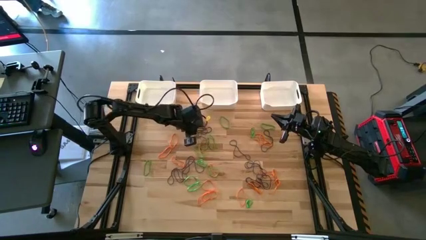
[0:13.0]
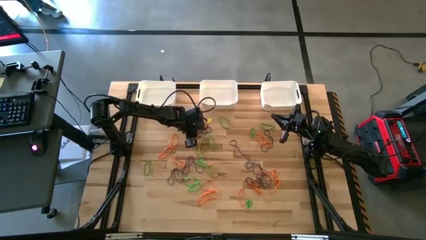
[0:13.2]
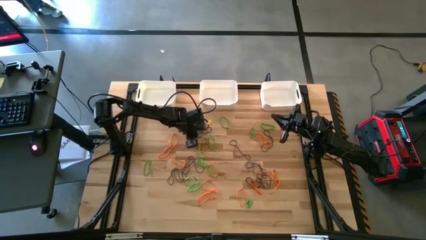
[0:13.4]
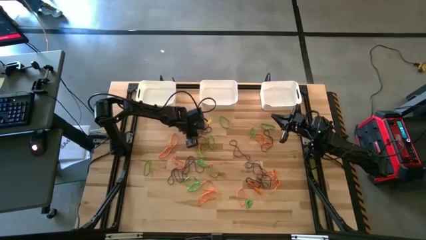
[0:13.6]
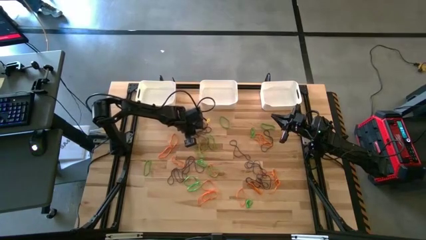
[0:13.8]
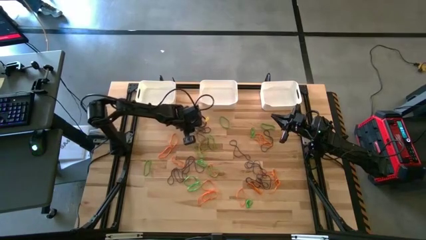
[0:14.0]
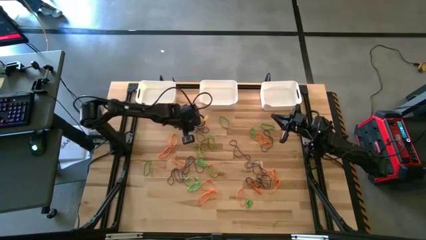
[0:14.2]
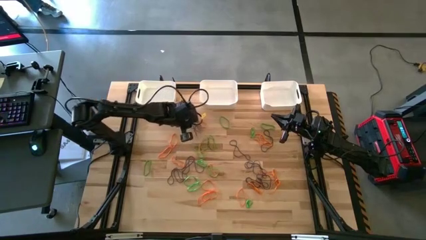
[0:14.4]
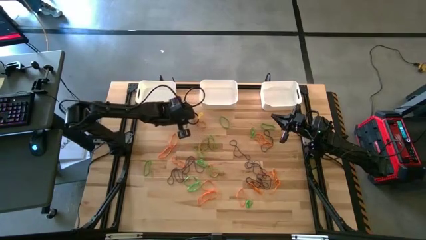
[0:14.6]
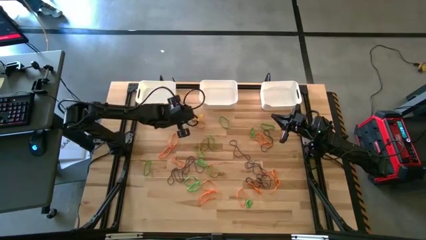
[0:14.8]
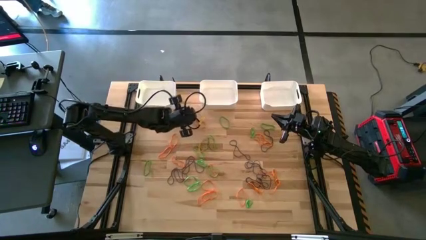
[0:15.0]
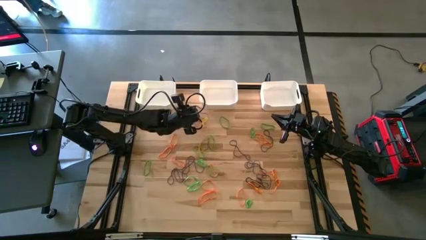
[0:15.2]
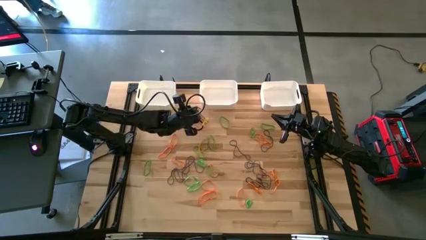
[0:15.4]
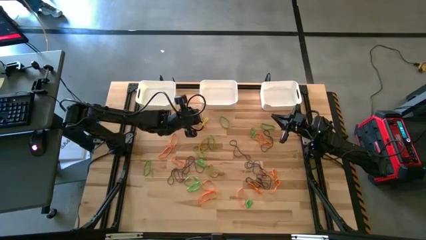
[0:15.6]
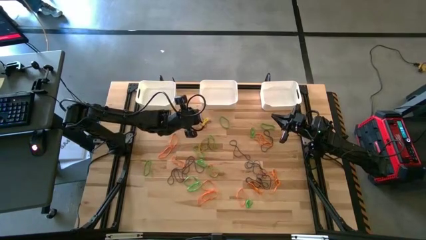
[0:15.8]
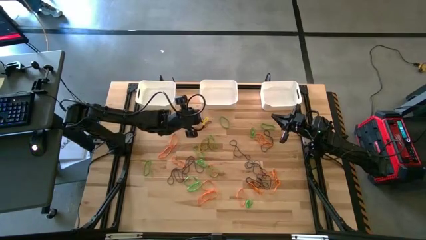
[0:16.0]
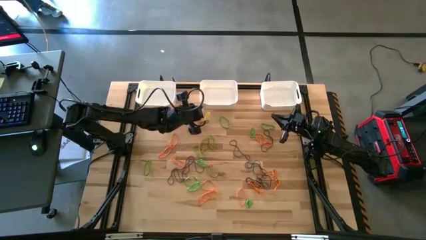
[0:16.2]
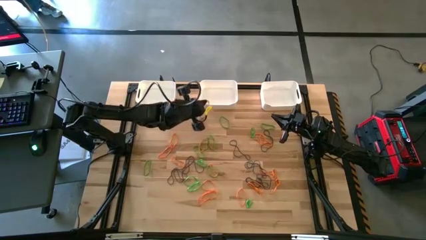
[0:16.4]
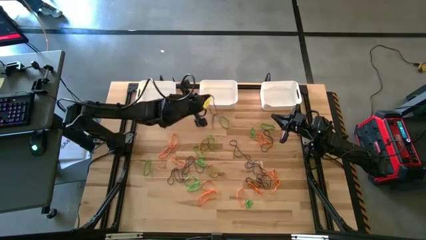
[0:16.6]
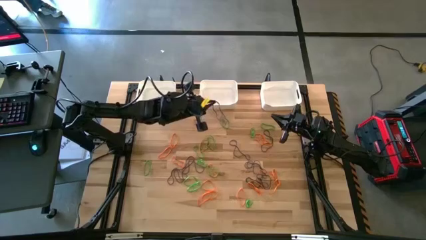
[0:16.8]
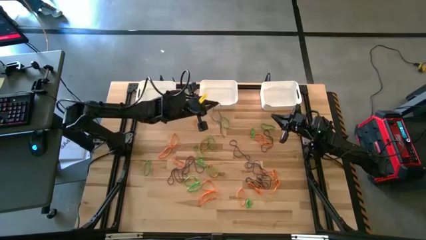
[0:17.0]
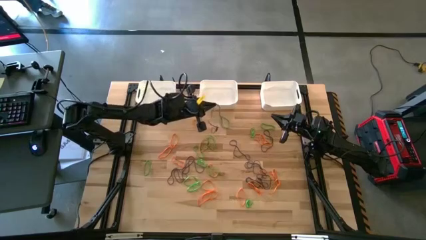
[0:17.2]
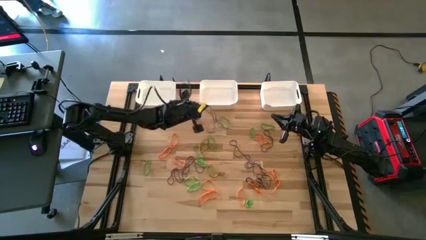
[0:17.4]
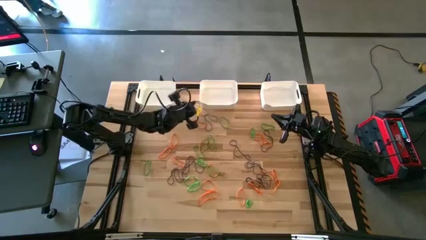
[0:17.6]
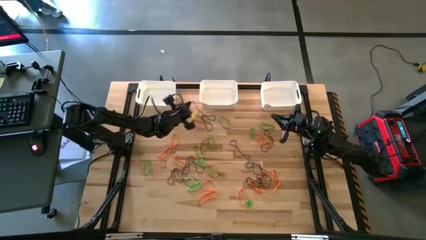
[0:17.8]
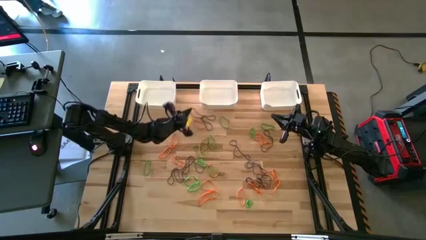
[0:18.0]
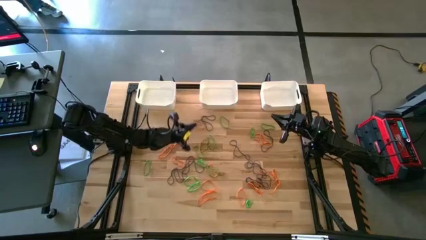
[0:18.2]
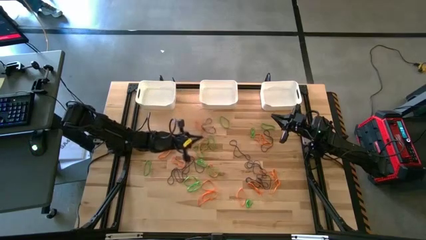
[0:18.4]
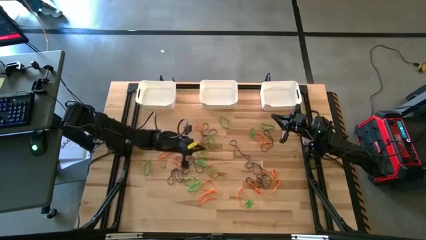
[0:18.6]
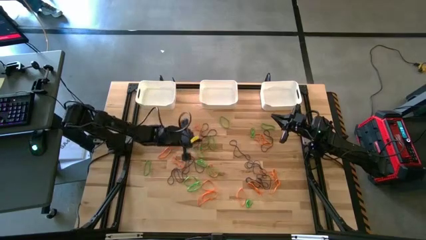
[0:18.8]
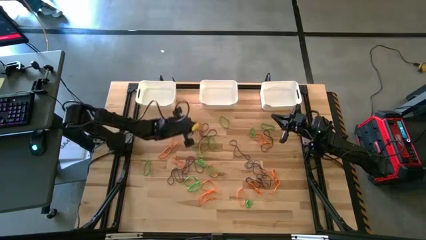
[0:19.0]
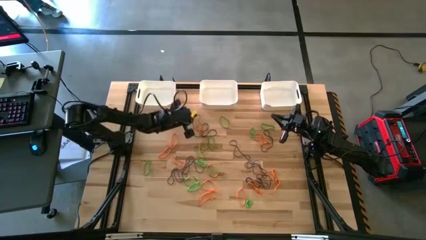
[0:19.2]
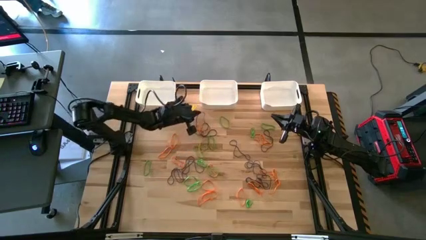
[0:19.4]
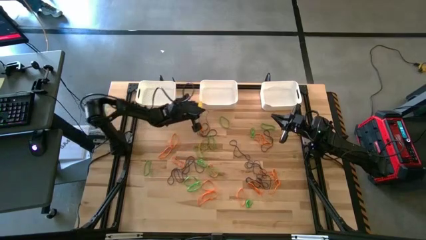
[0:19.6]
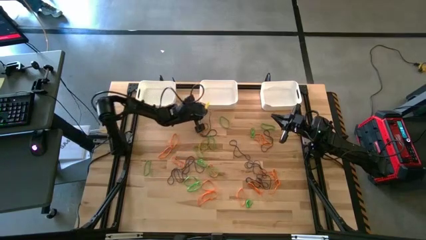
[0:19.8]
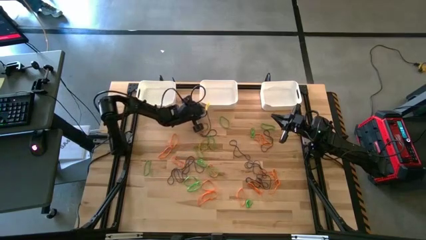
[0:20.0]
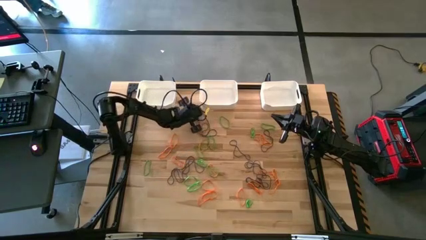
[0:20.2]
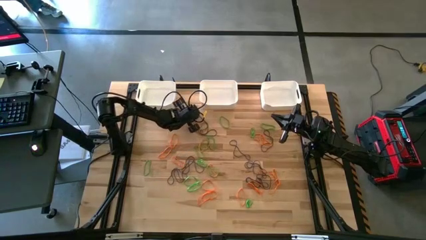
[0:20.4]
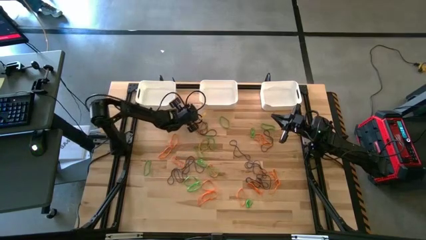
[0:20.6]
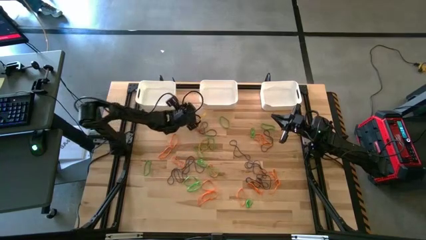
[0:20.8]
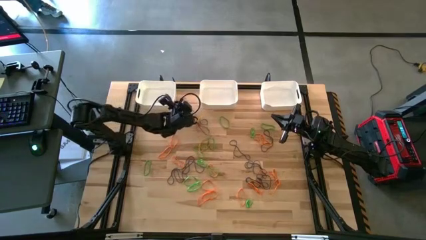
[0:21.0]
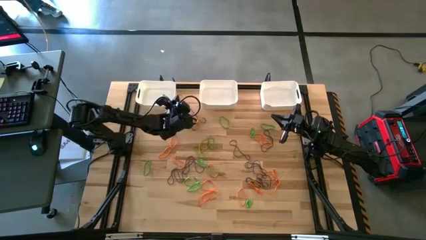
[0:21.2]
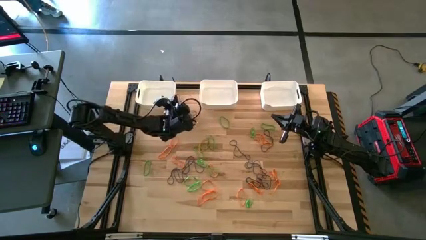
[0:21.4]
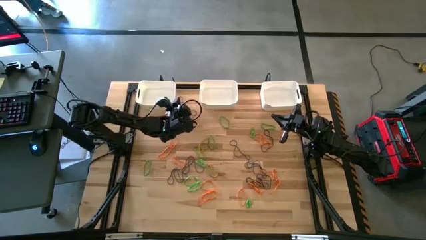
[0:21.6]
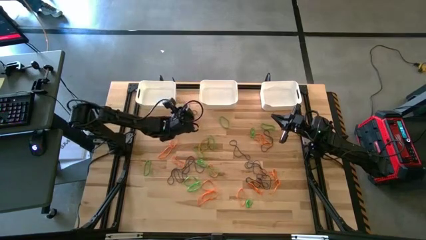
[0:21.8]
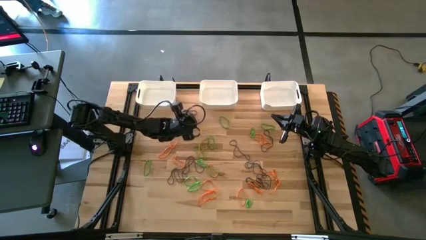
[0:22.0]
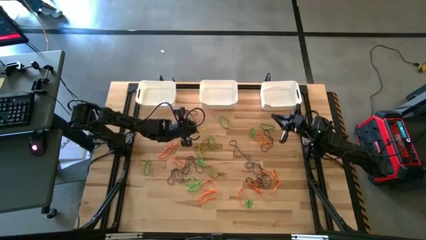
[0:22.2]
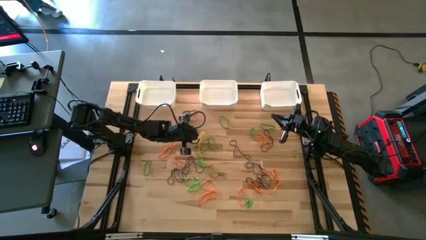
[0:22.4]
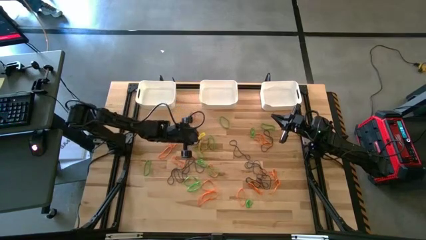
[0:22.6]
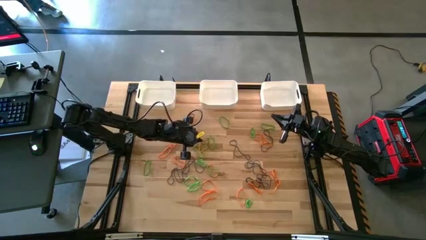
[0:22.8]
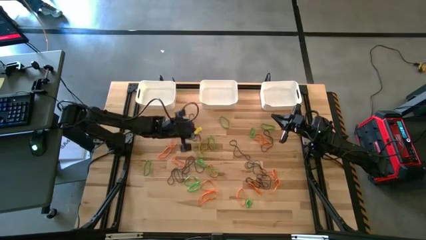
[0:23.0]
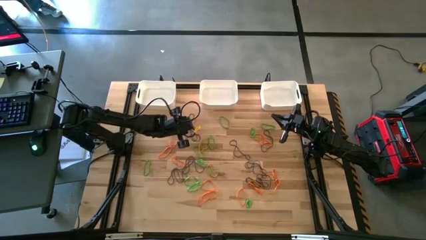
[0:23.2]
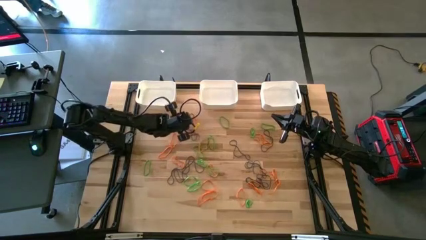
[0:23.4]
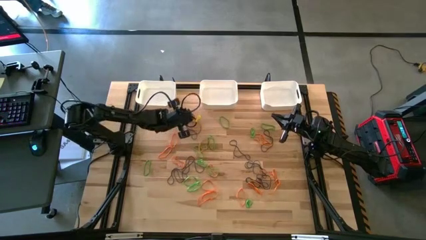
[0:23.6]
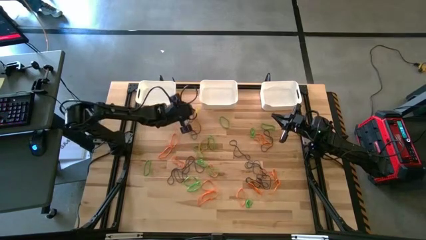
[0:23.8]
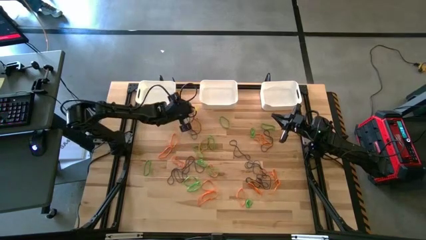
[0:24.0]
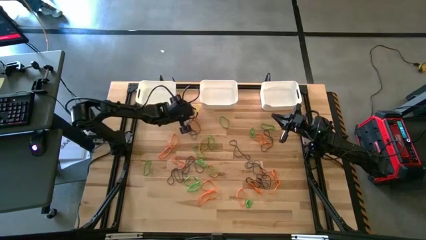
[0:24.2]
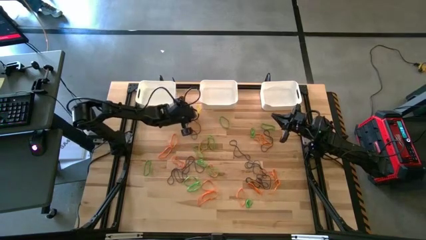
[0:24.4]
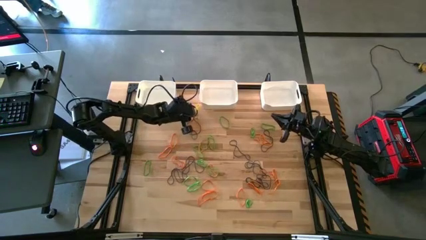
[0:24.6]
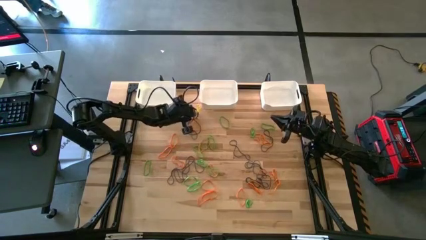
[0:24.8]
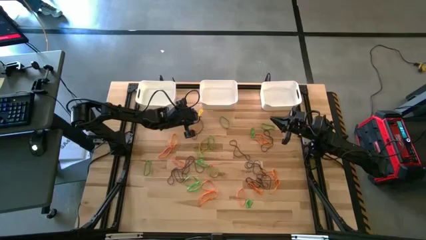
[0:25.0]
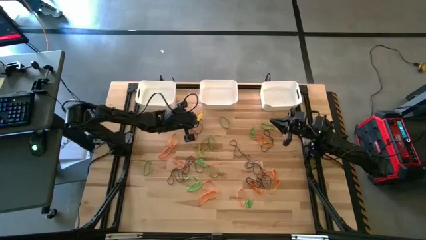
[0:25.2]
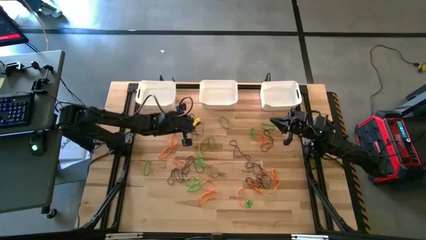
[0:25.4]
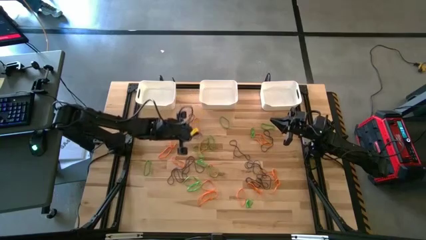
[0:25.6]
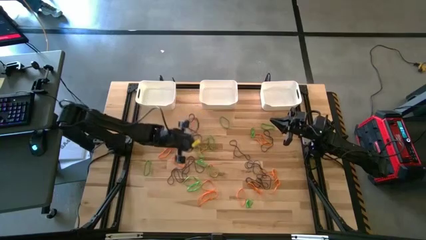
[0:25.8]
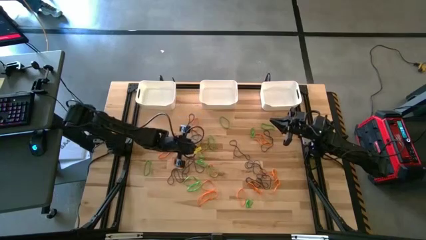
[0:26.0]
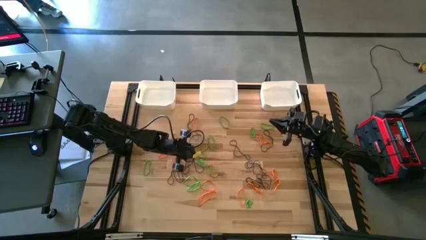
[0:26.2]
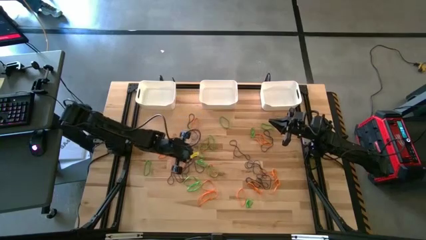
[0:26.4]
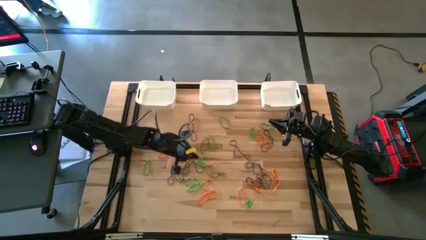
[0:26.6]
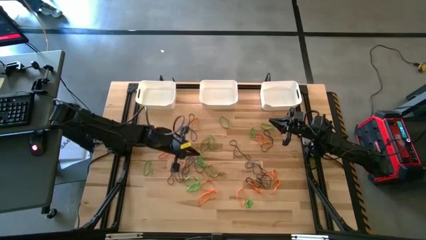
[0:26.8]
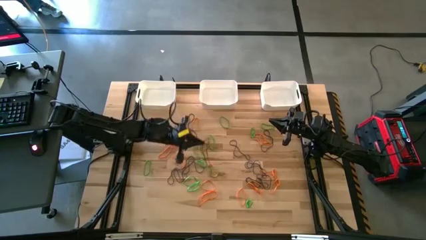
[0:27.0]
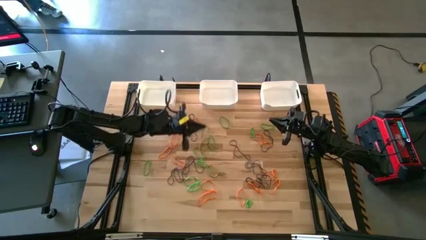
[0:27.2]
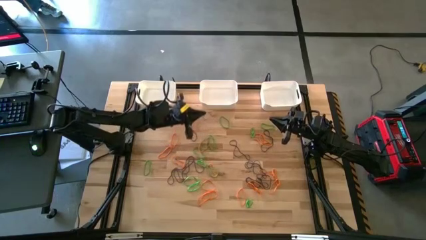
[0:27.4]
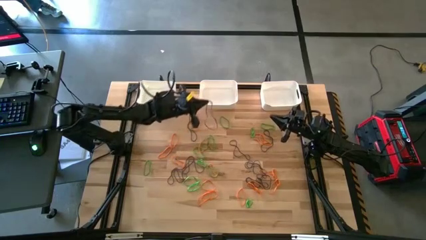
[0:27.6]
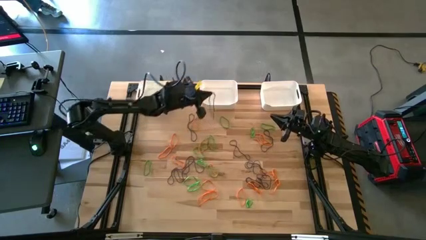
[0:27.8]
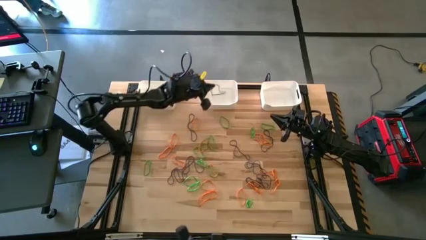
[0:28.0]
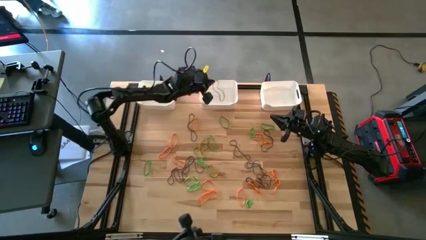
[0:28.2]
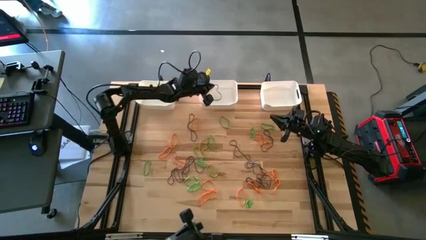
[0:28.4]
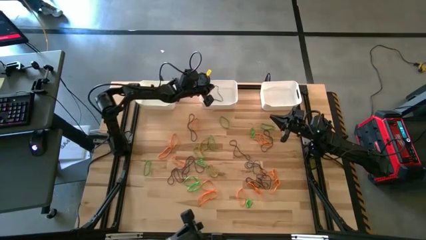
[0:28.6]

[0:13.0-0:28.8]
Task: Sort rubber bands into baskets
Put the purple rubber band into the middle white bin
